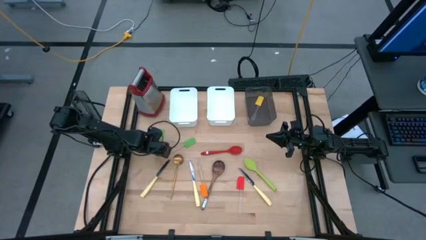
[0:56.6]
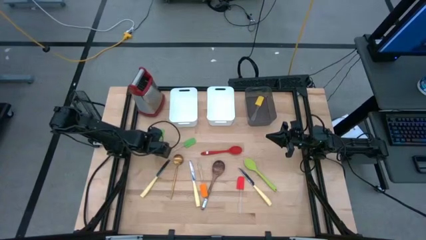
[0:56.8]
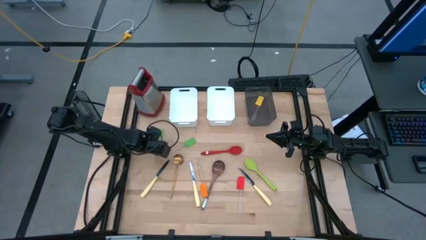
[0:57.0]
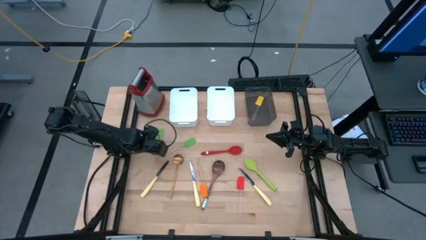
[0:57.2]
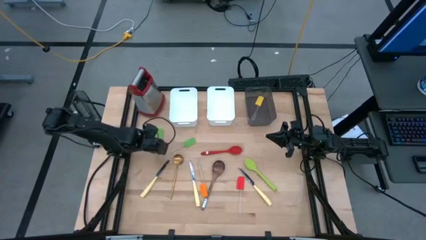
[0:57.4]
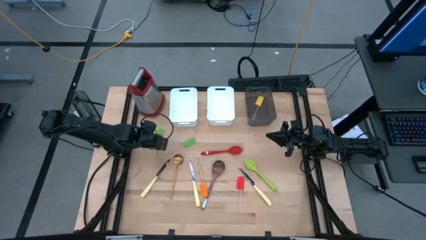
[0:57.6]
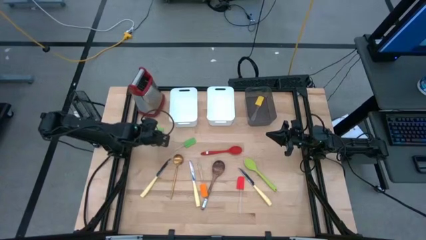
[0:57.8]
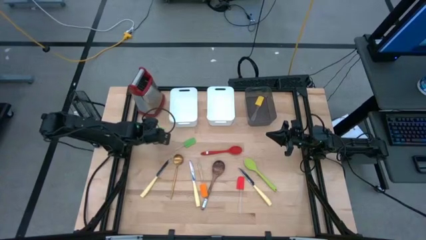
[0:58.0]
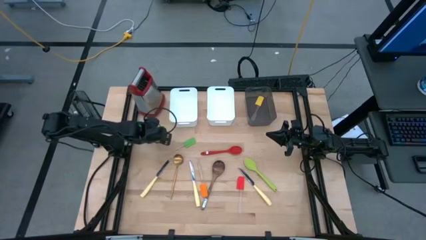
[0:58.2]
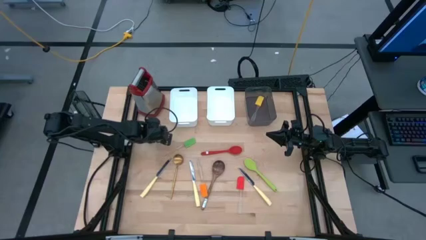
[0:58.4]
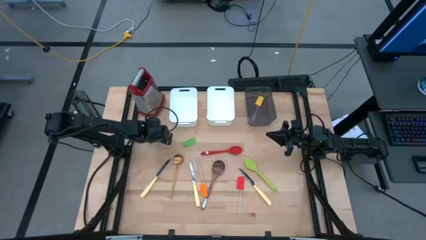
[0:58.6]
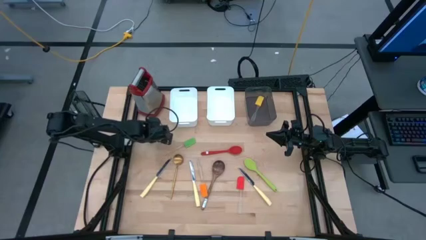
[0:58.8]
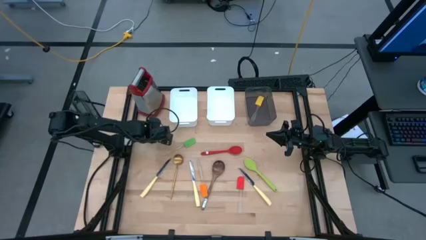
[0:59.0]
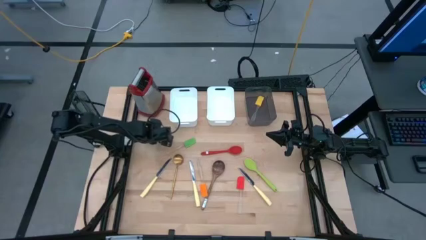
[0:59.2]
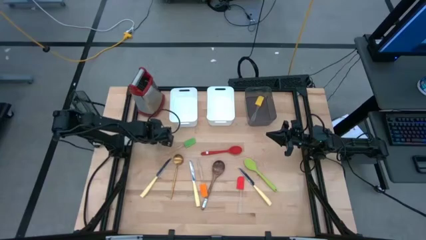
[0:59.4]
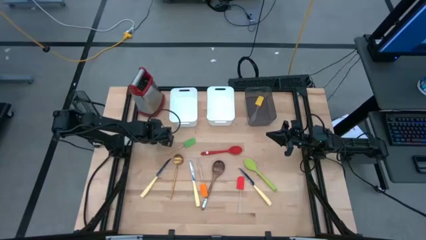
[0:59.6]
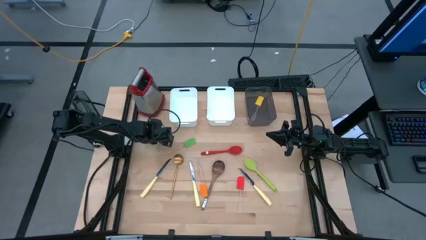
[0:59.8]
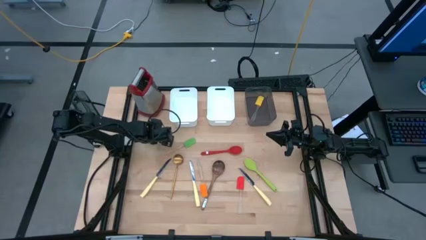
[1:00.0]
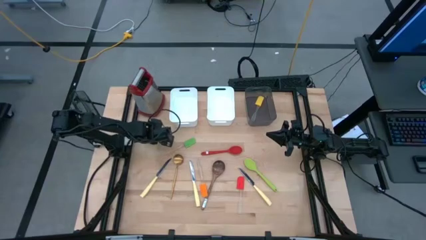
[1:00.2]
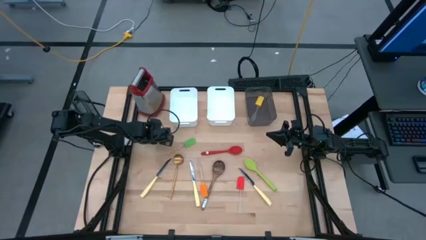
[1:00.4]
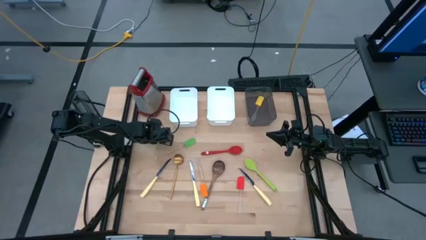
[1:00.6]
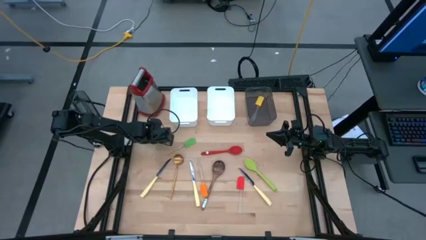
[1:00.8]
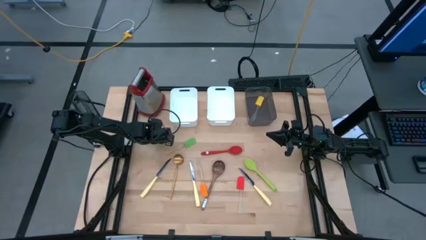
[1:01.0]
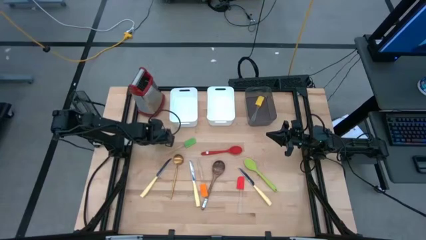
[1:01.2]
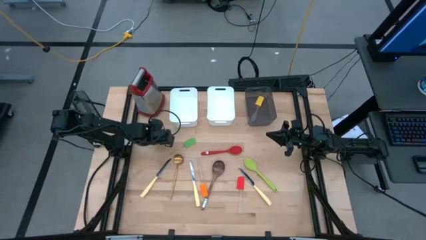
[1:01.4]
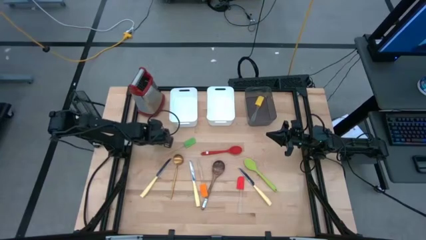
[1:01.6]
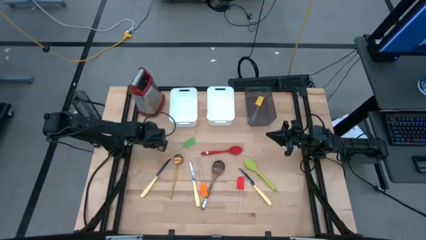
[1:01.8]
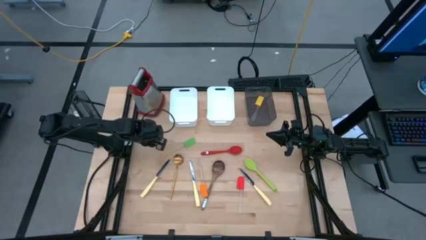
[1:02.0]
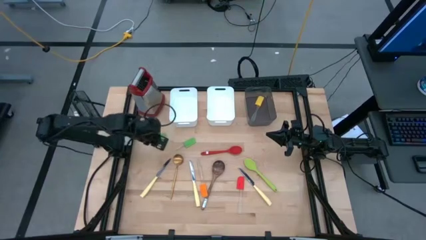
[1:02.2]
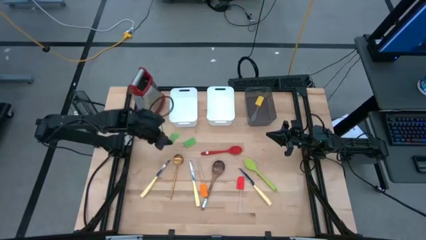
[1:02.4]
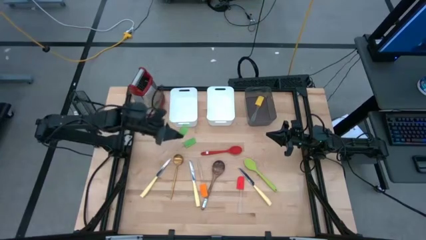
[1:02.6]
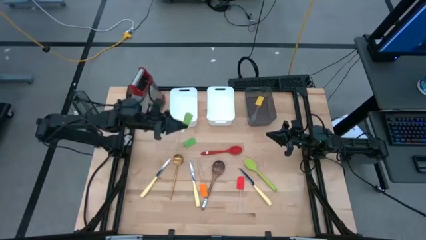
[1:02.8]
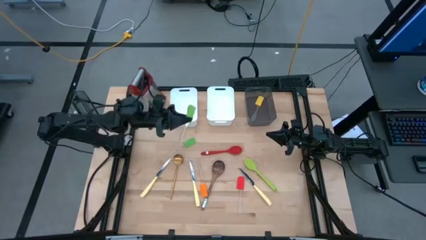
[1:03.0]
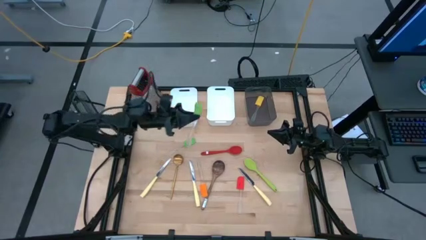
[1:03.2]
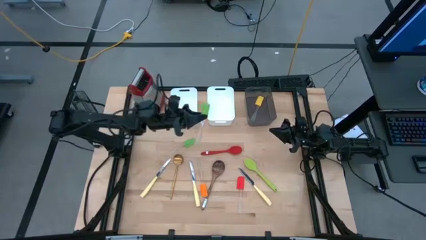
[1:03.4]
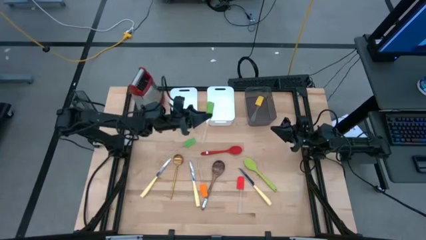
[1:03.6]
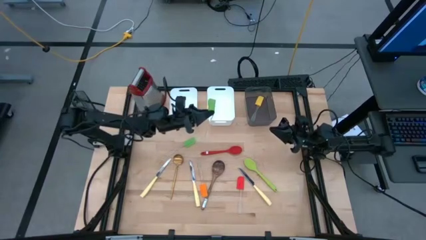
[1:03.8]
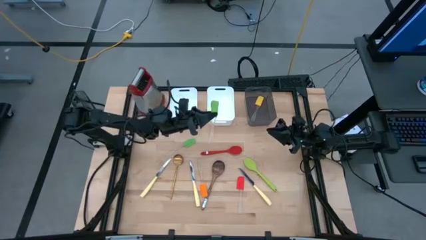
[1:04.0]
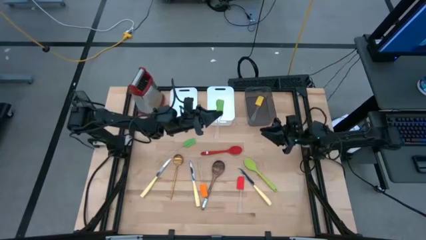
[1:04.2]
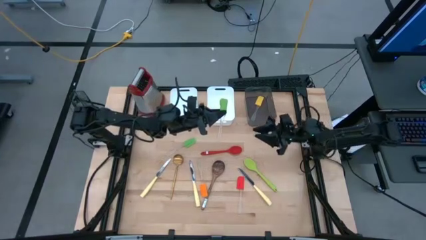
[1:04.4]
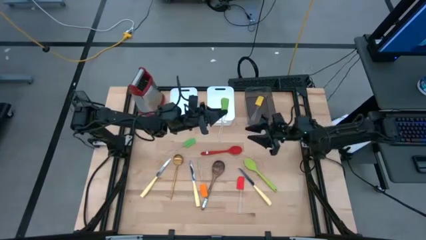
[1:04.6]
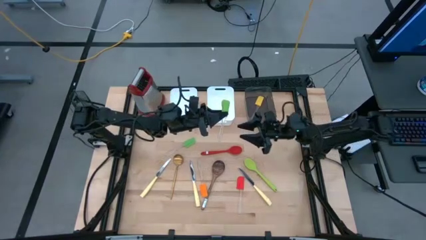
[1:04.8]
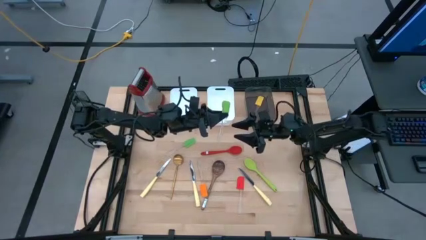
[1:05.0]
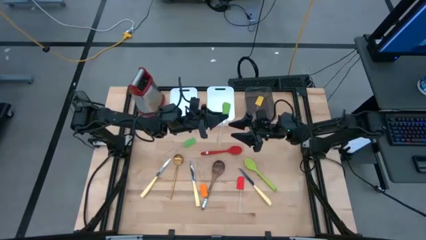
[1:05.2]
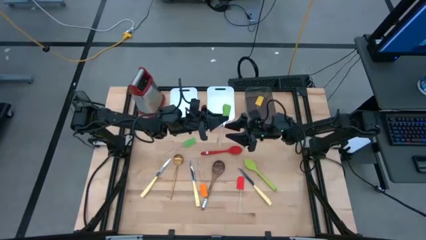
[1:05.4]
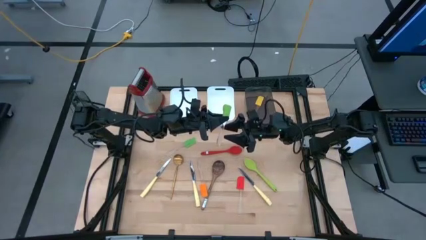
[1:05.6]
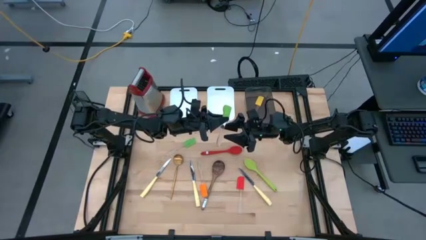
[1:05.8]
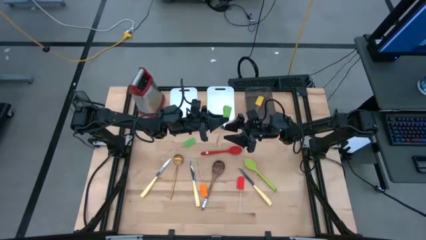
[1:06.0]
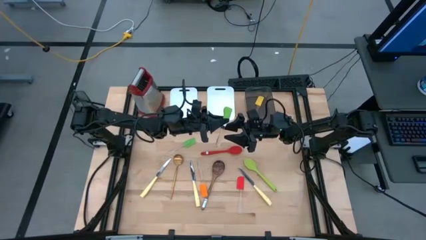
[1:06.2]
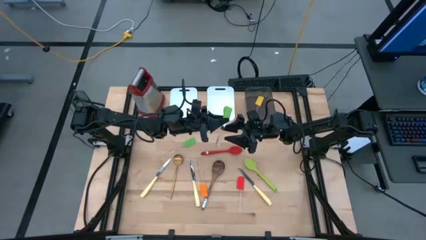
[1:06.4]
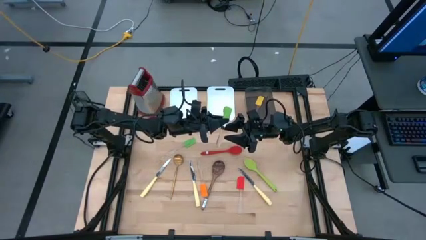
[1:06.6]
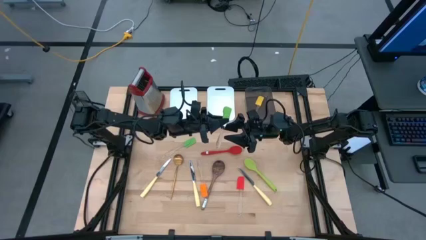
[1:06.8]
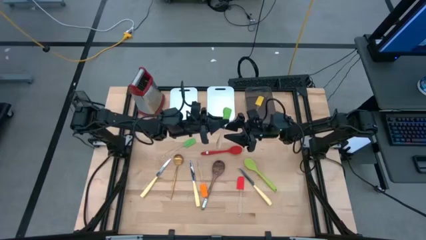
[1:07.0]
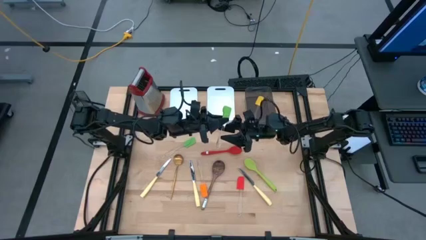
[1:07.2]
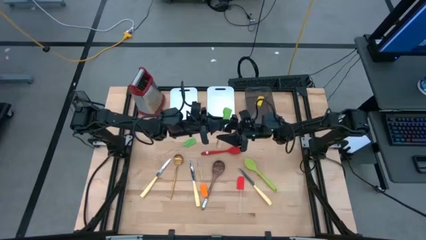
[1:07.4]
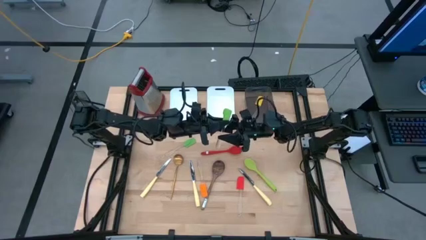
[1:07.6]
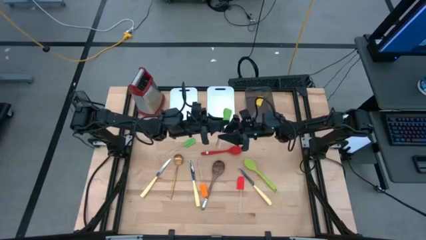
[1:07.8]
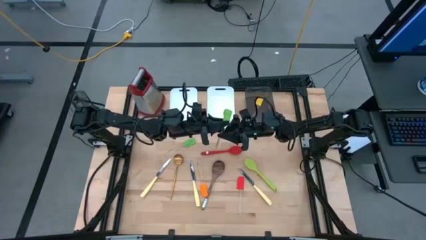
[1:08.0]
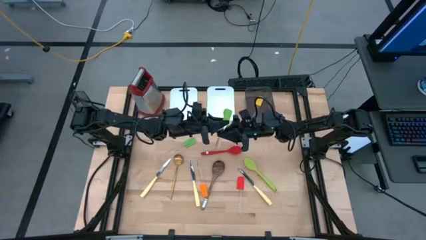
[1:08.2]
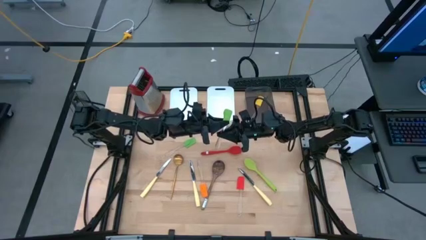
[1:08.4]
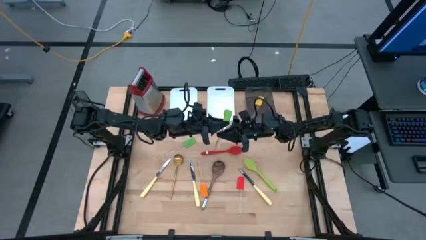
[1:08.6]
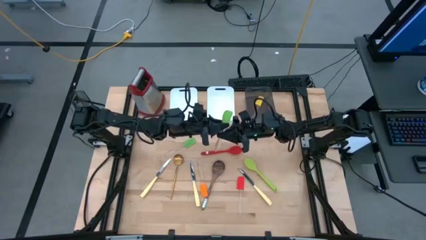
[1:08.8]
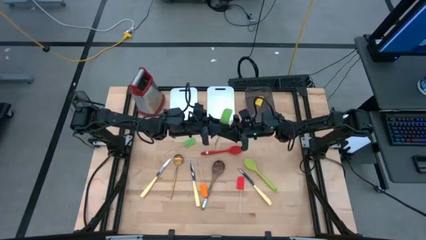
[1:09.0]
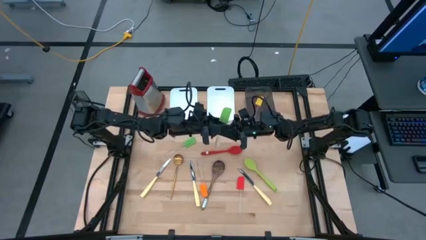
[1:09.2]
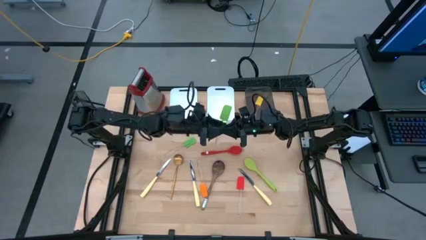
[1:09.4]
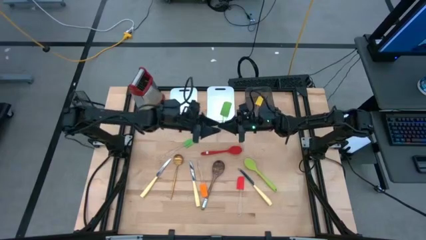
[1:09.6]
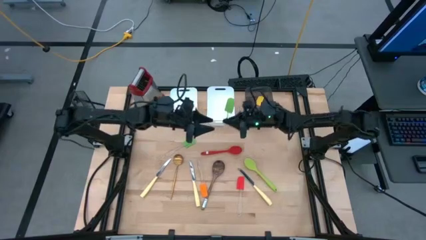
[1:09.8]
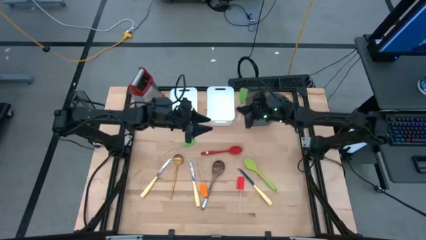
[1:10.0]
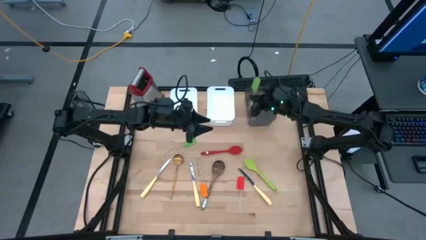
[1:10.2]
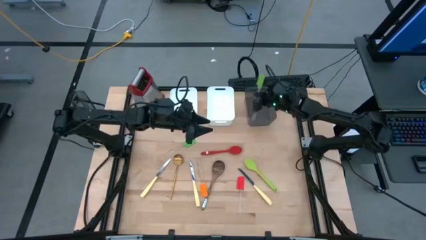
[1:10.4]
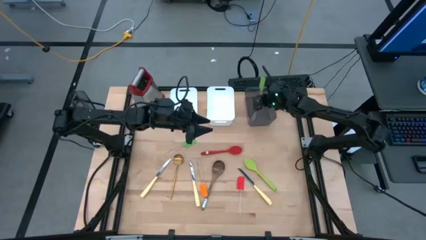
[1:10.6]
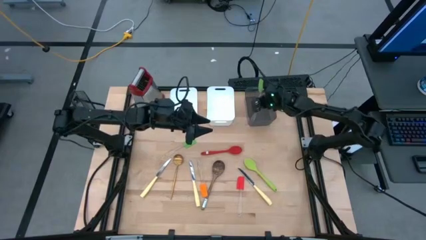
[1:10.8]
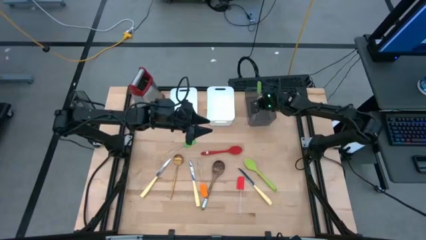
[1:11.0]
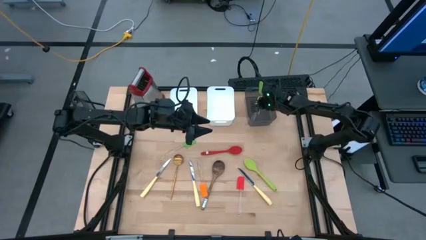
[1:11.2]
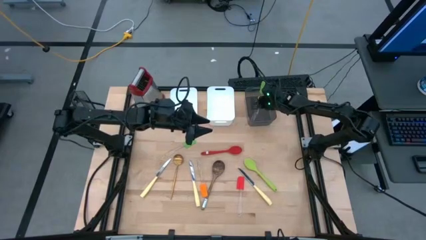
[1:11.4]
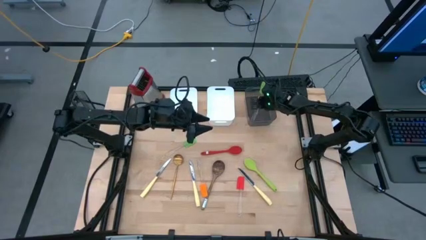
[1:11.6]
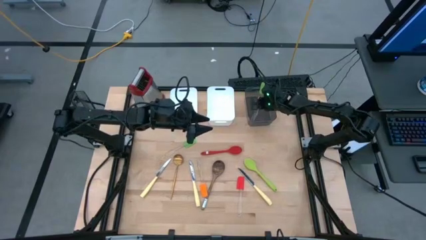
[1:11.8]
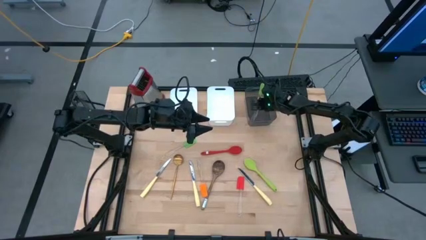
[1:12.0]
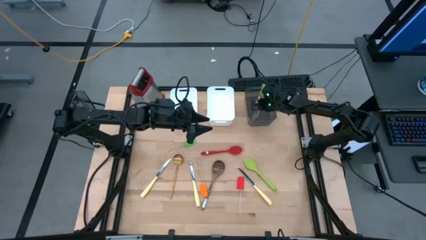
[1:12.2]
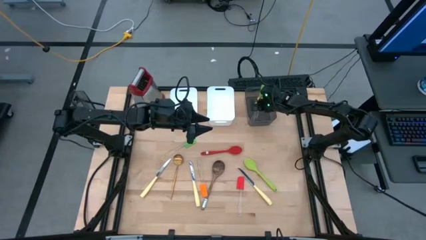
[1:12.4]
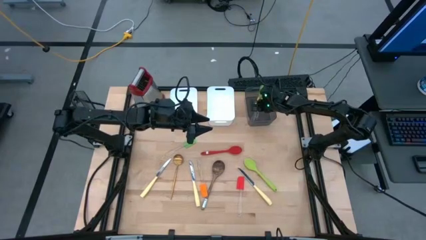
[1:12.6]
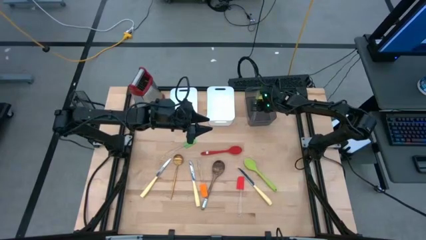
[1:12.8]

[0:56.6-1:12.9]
Task: Pick & Place Kitchen Items
Put the green silicone spatula into the black bin
